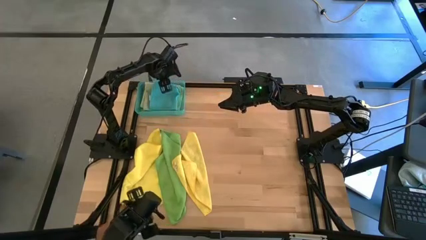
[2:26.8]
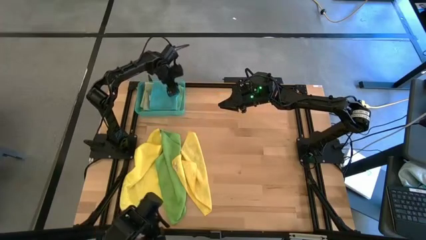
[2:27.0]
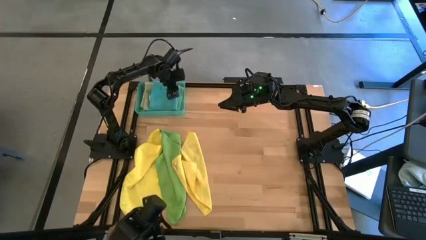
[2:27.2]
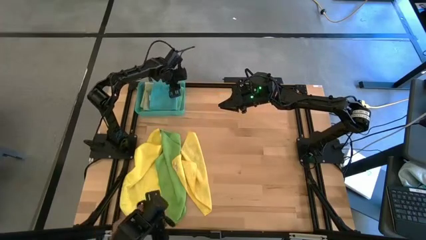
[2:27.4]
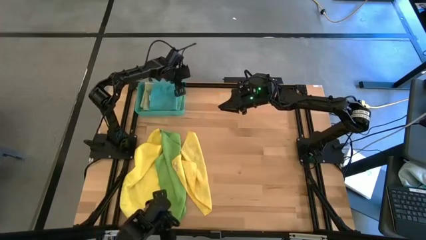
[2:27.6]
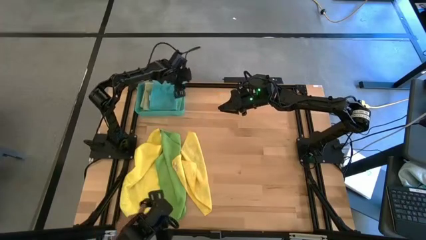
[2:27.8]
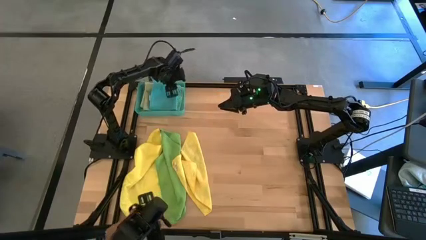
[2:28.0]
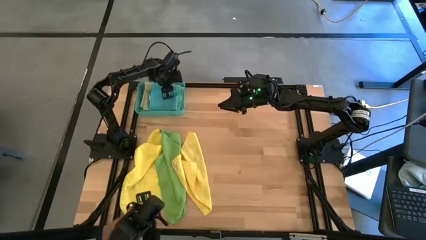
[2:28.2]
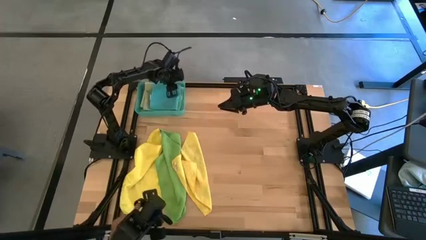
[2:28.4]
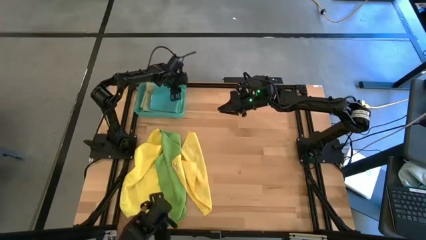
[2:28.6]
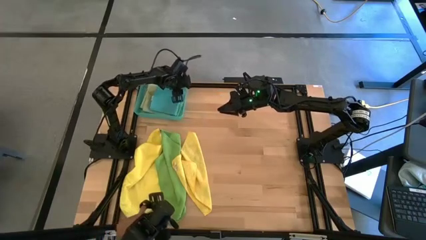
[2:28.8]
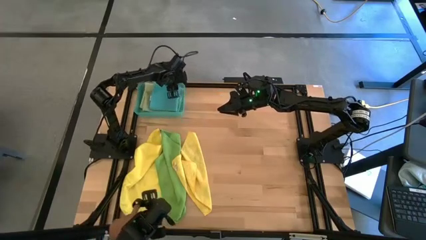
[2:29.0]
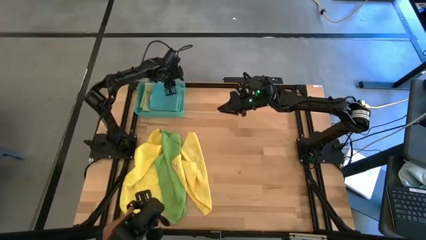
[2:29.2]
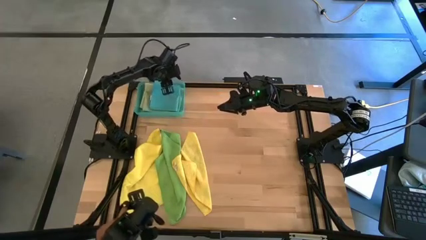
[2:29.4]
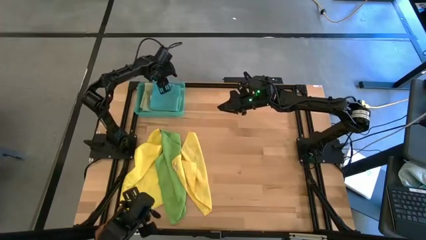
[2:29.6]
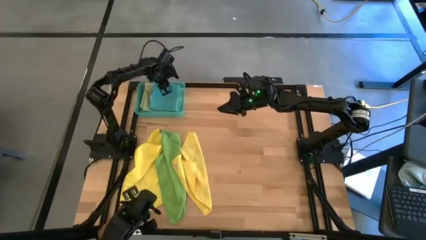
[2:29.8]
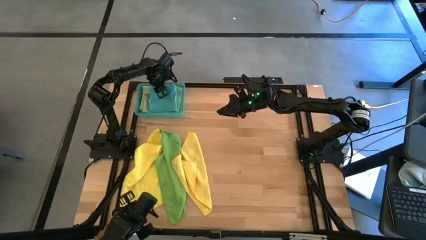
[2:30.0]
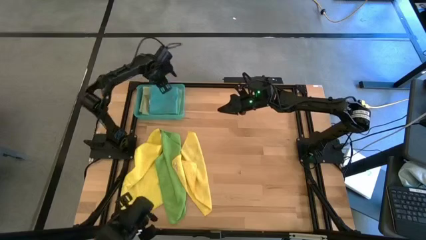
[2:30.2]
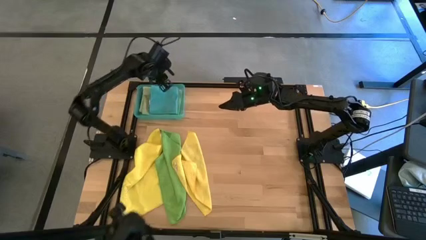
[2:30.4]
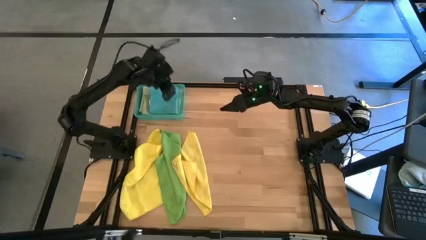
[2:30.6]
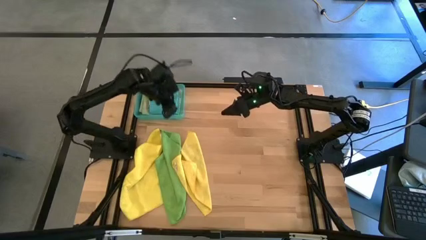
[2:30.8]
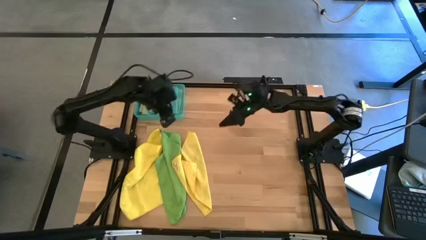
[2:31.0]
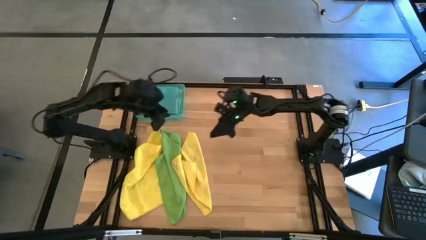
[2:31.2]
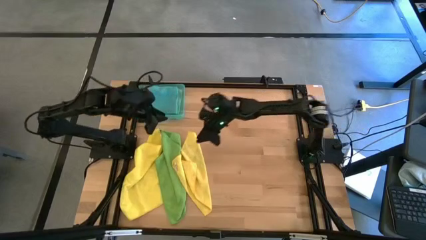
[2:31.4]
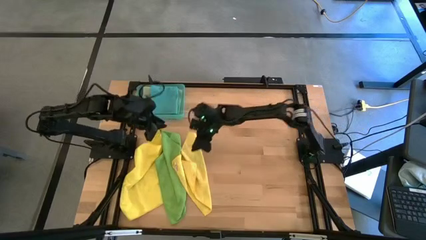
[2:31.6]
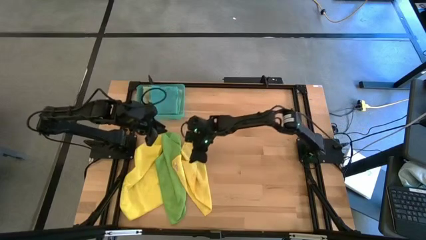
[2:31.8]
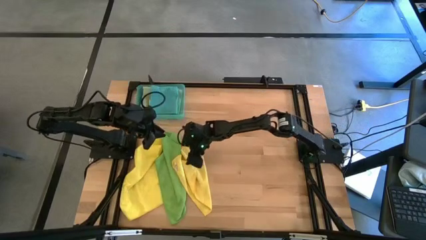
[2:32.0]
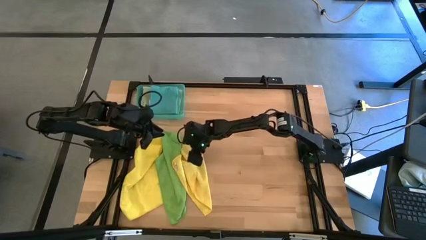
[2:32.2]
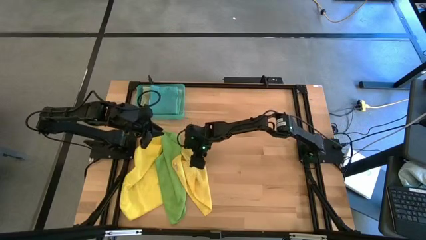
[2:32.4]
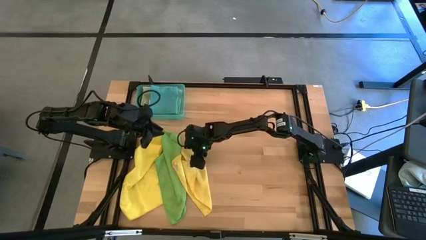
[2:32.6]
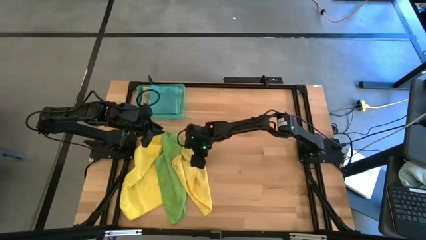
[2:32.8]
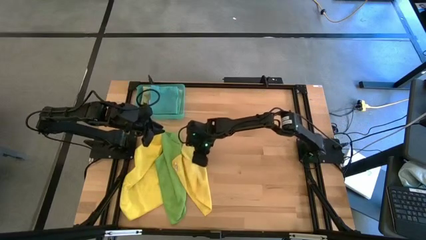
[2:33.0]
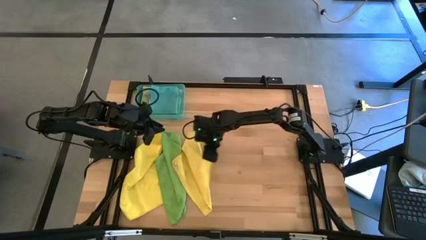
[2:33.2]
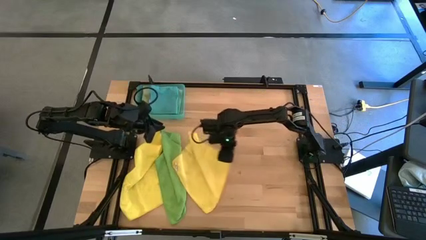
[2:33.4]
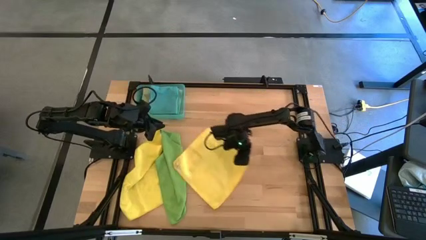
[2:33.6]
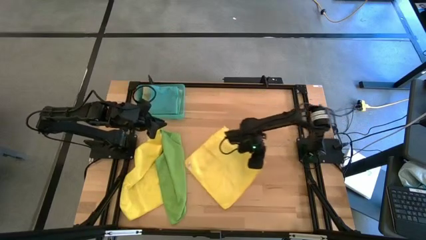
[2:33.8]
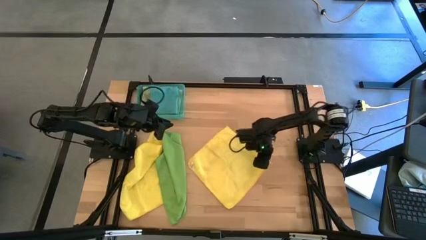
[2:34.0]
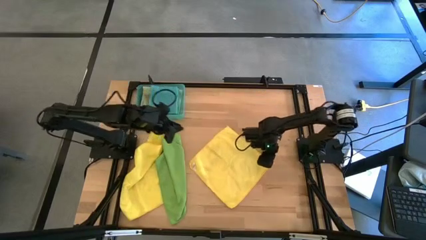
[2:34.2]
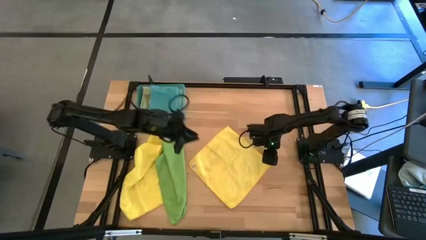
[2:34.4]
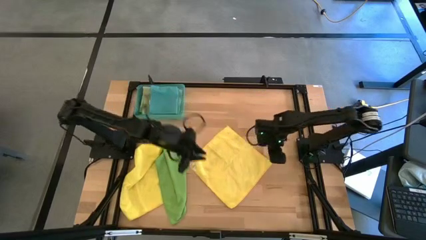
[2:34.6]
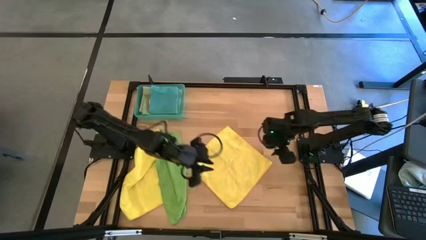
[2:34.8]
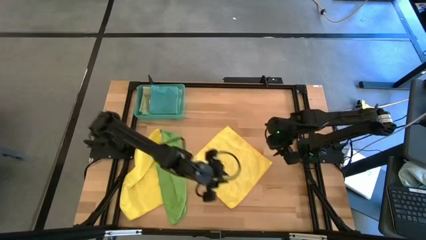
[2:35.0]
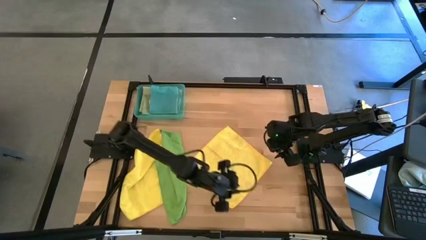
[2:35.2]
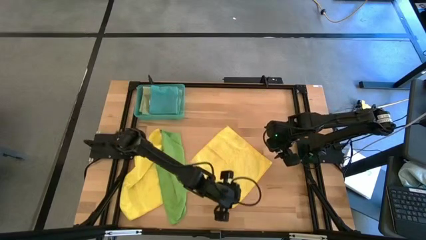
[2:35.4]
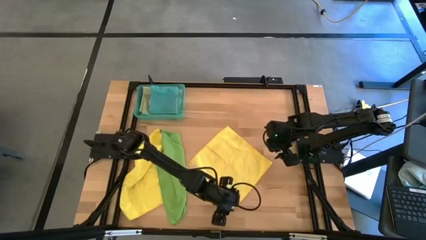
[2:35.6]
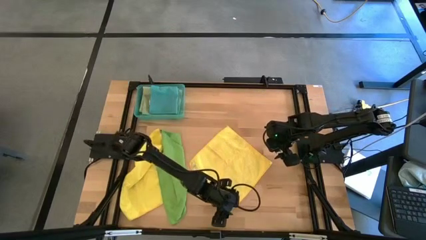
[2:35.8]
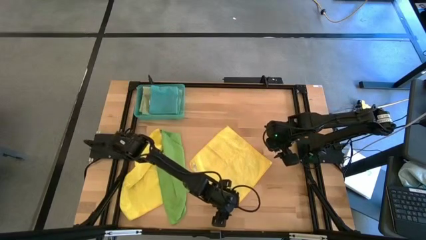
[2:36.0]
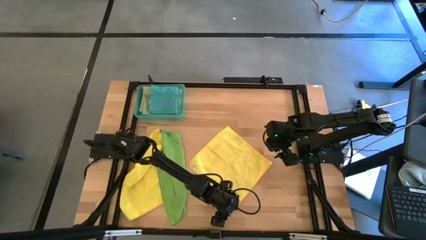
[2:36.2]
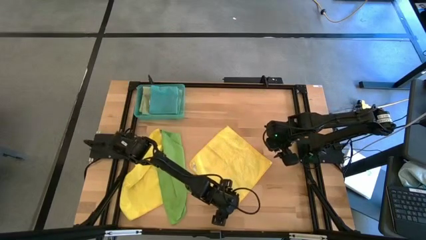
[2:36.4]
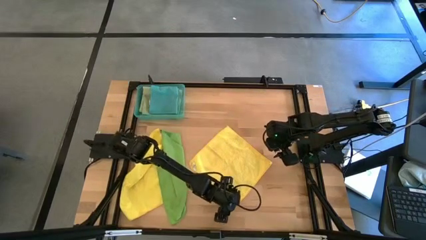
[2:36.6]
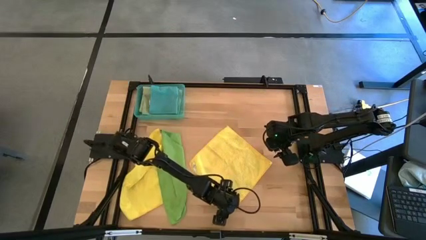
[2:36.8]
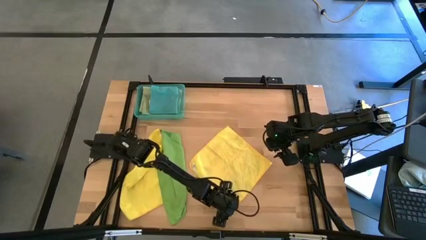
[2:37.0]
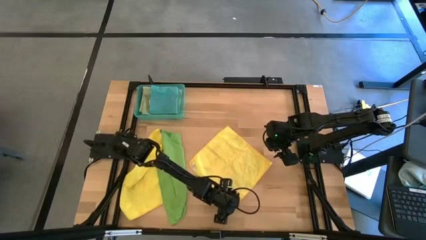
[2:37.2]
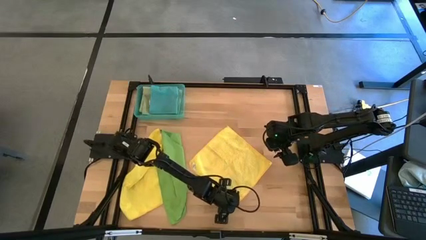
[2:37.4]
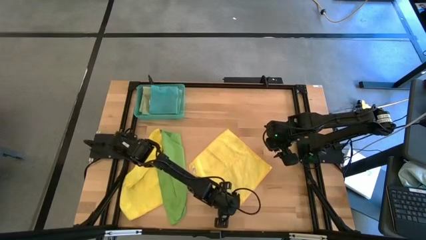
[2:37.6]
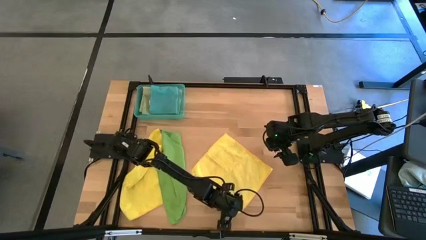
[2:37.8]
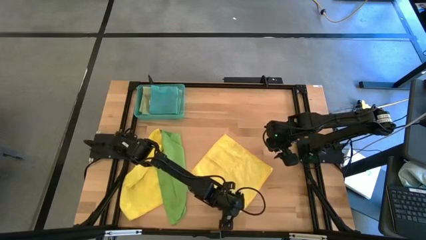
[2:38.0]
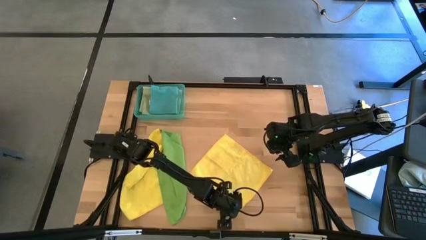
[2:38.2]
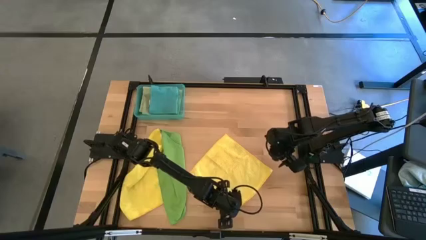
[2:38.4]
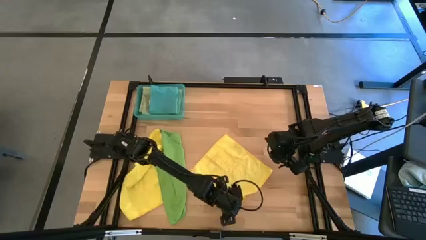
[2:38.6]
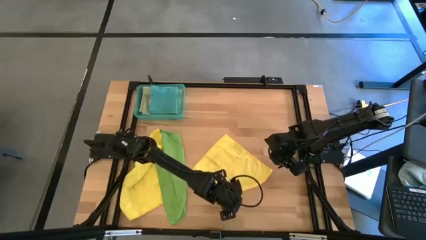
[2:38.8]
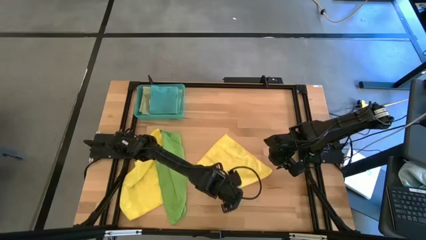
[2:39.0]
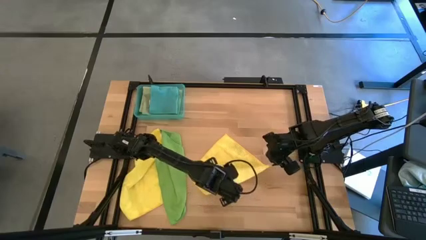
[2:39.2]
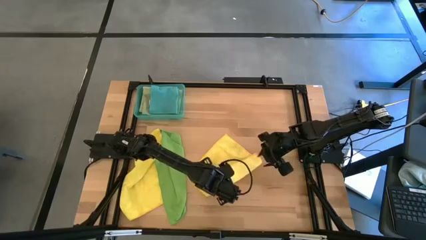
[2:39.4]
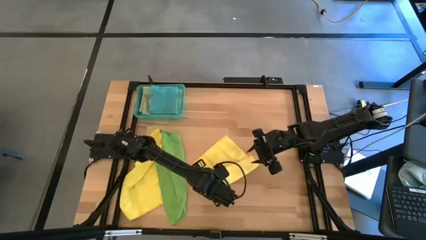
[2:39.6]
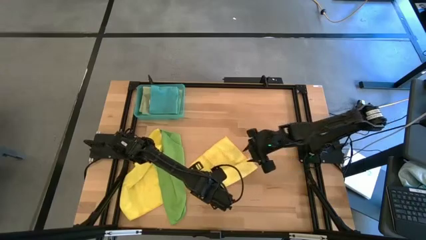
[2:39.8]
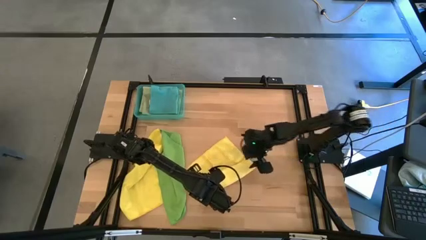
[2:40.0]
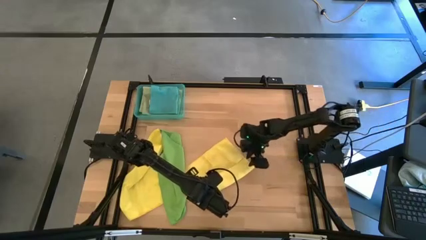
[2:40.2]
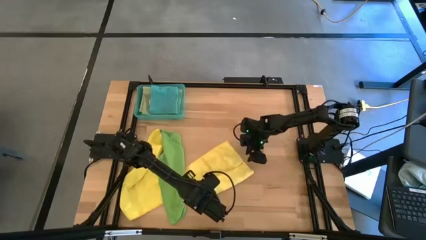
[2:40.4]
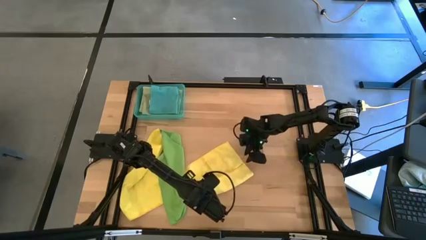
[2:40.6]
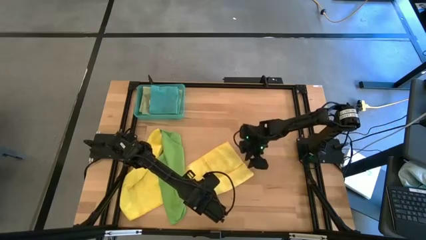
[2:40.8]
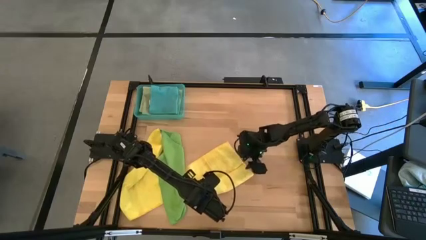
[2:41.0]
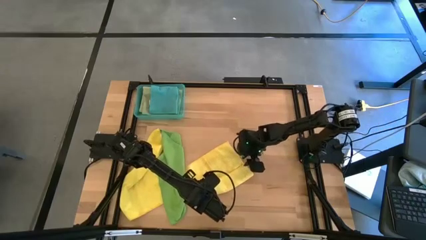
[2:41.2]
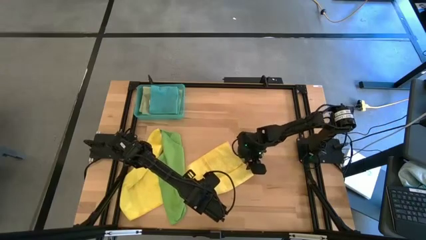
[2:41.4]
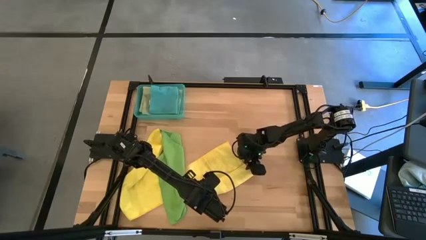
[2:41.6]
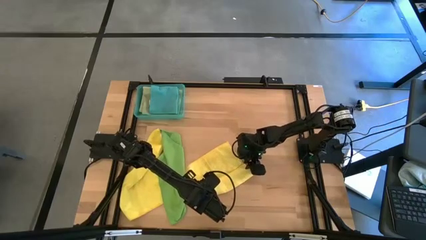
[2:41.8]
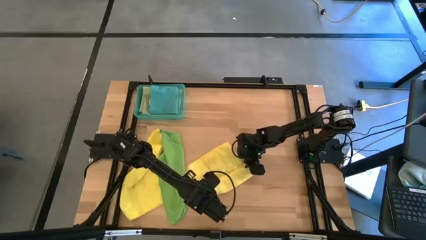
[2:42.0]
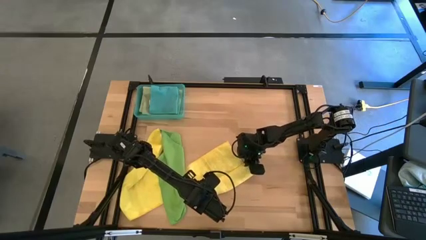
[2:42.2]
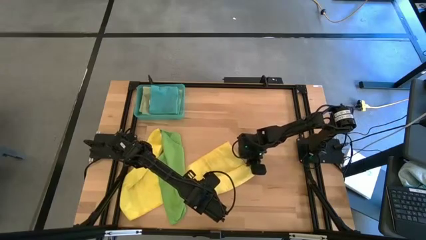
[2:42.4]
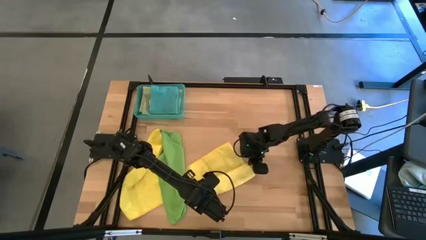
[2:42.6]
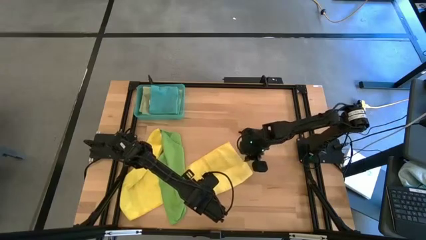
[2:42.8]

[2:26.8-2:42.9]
Task: Fold microfiber towels
Fold the right yellow microfiber cloth

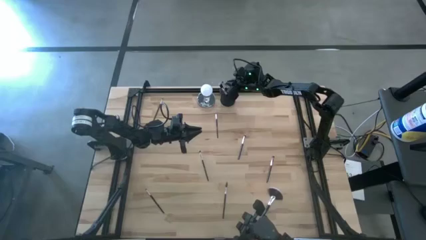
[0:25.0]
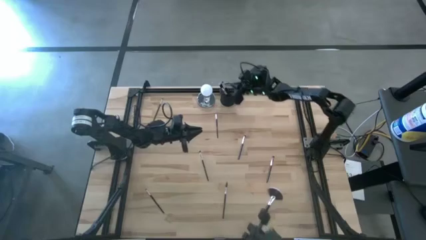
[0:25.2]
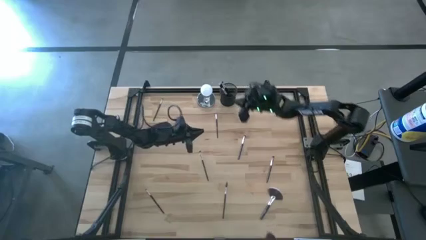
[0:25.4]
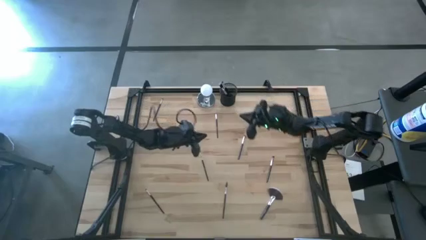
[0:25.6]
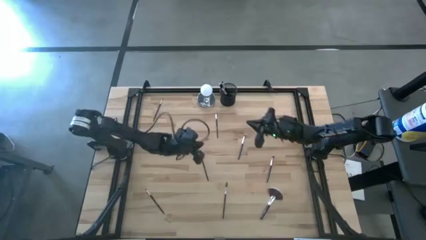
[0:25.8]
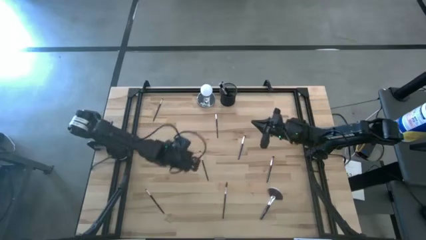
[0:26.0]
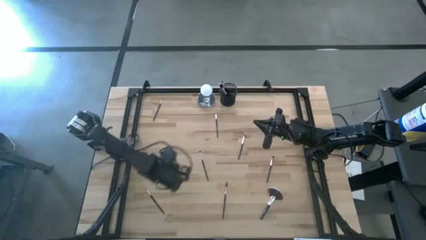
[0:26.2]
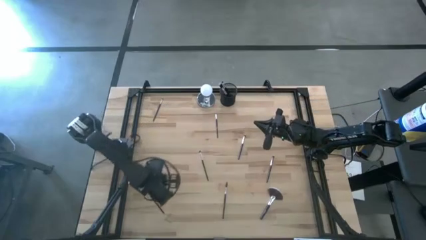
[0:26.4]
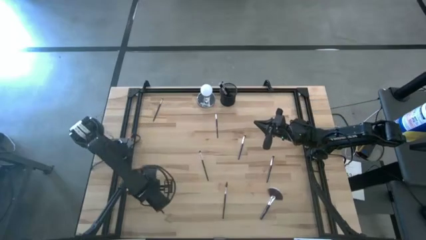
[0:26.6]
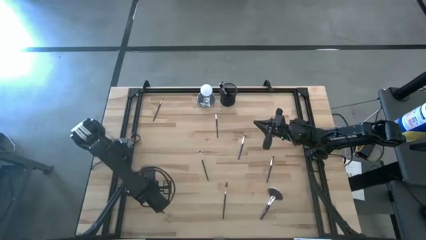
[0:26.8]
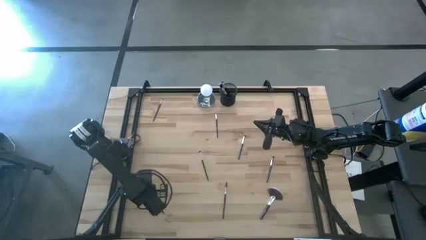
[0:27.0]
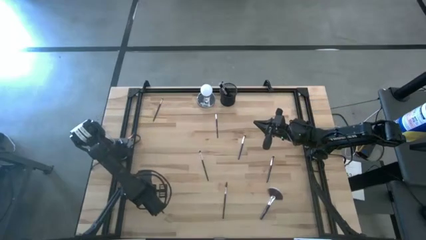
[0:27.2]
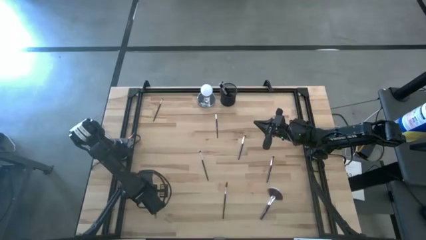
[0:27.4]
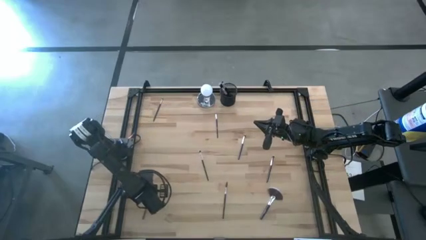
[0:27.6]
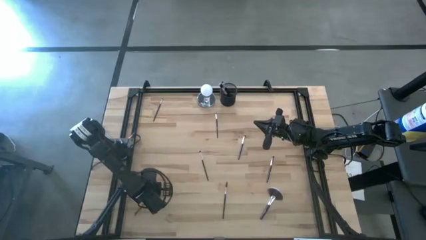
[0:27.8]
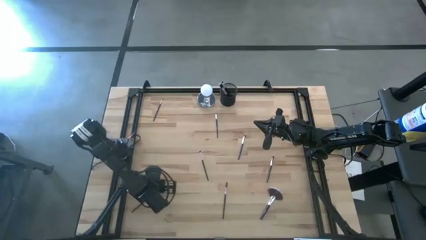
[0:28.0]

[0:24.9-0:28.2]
Task: Pick & Place Makeup Supplies
Put the makeup brush into the black makeup holder
